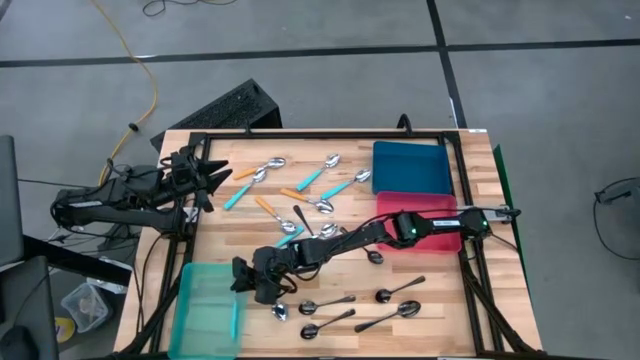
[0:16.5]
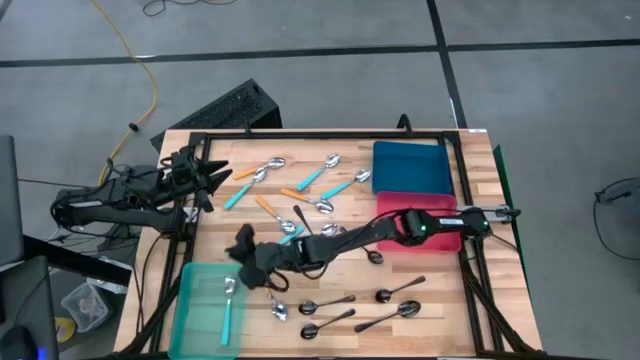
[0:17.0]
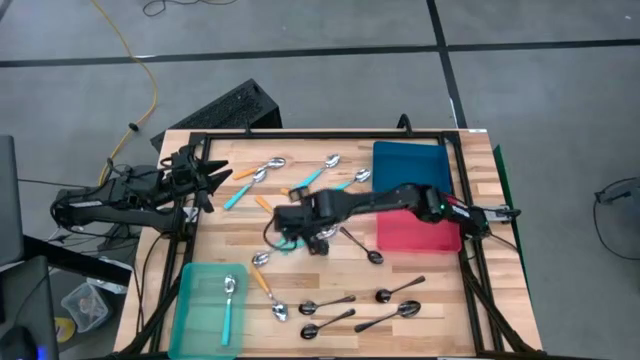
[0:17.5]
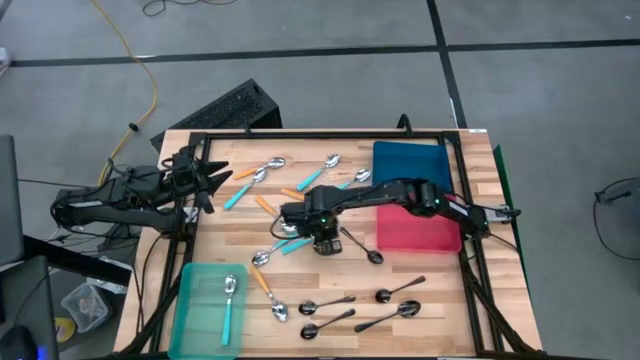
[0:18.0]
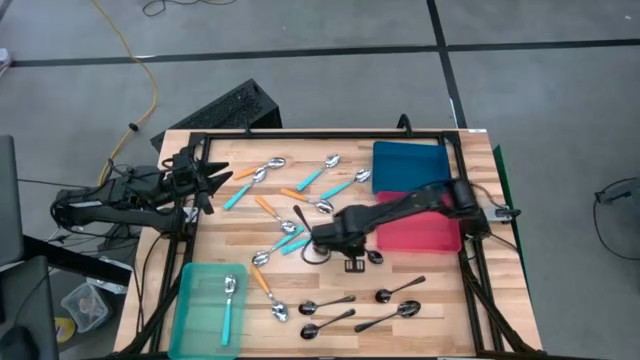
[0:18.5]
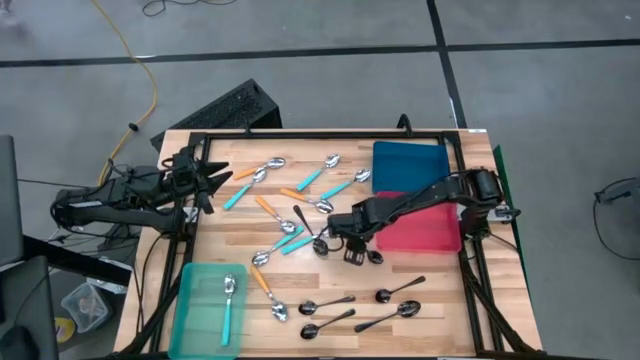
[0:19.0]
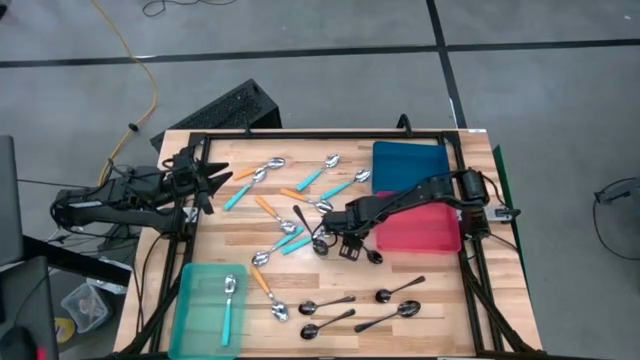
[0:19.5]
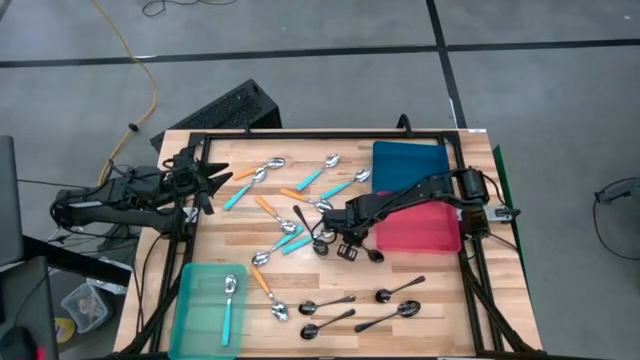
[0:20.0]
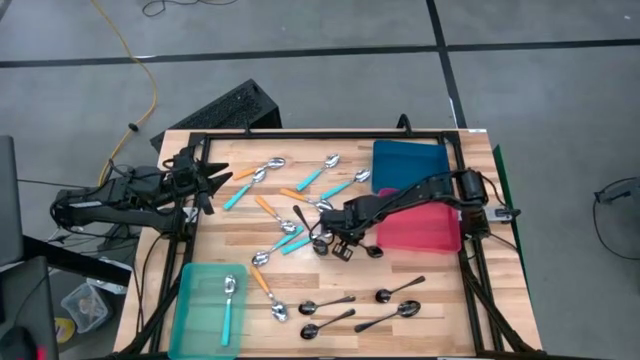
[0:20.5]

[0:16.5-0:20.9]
Task: Sort silverware by color (type)
Put the black spoon into the red bin

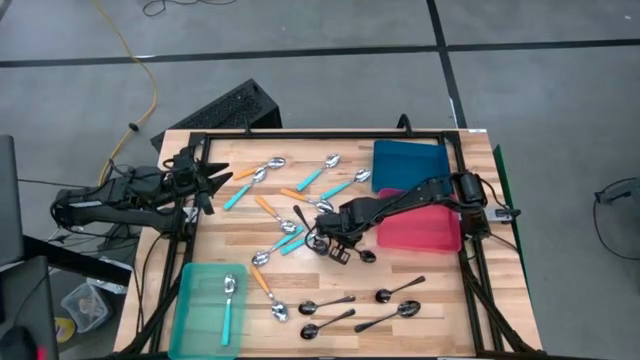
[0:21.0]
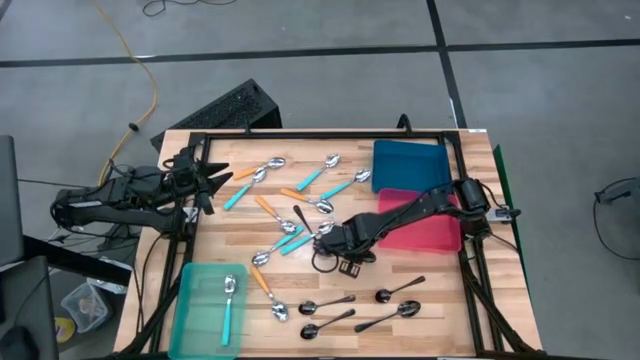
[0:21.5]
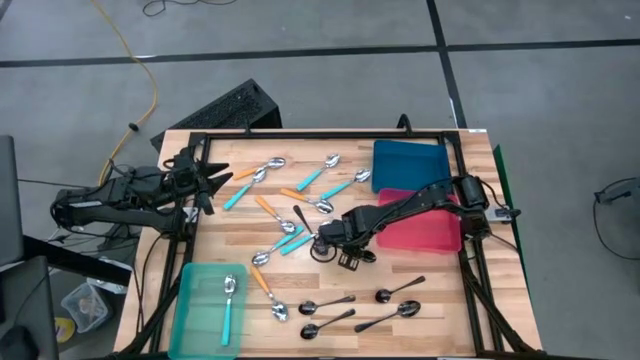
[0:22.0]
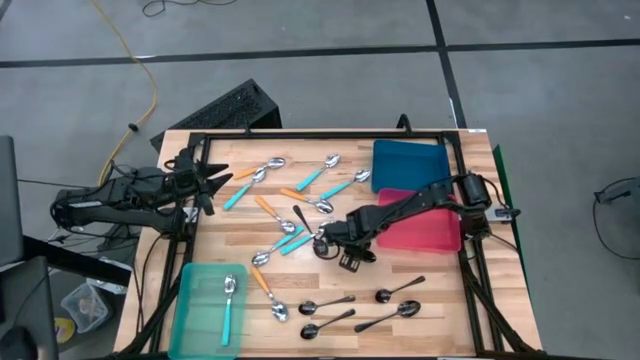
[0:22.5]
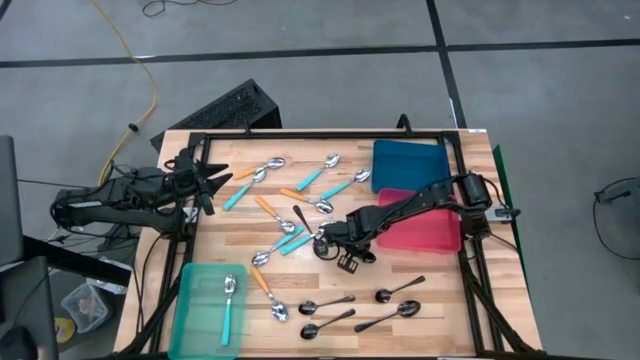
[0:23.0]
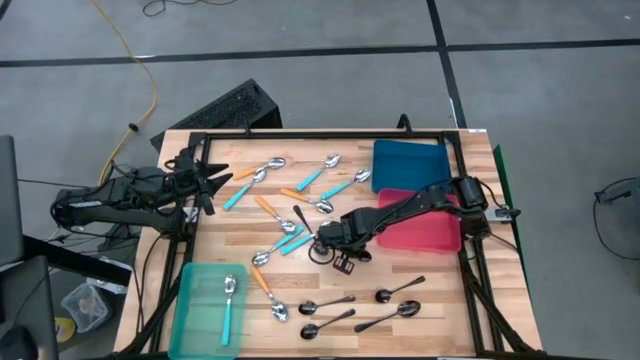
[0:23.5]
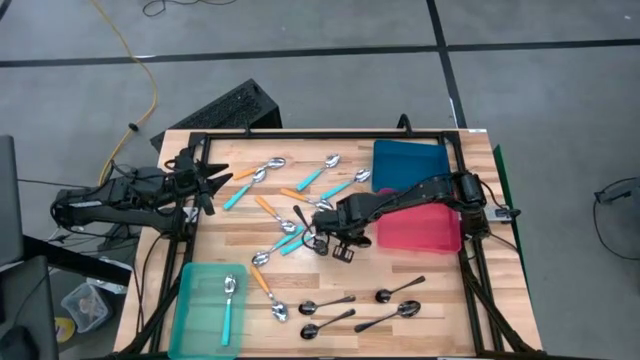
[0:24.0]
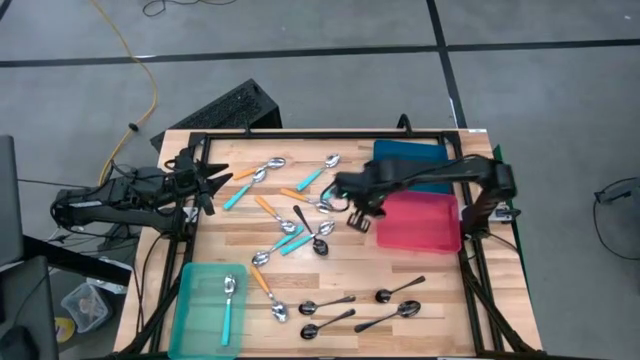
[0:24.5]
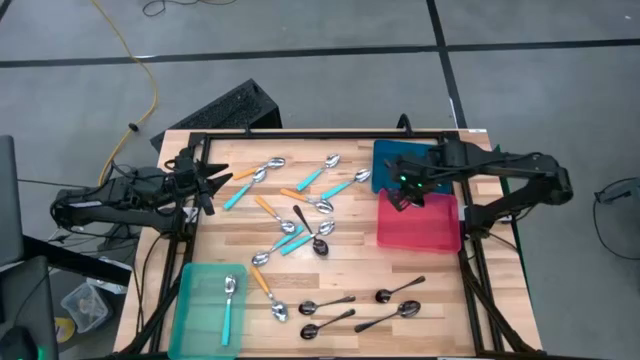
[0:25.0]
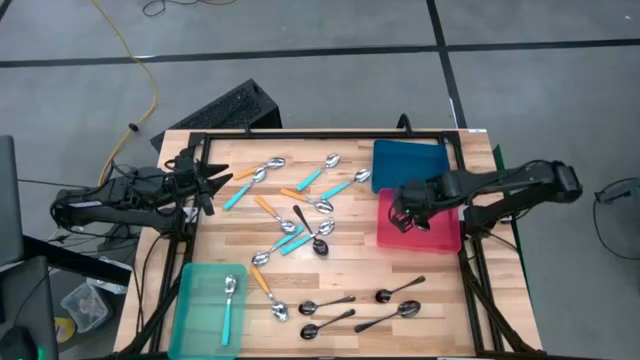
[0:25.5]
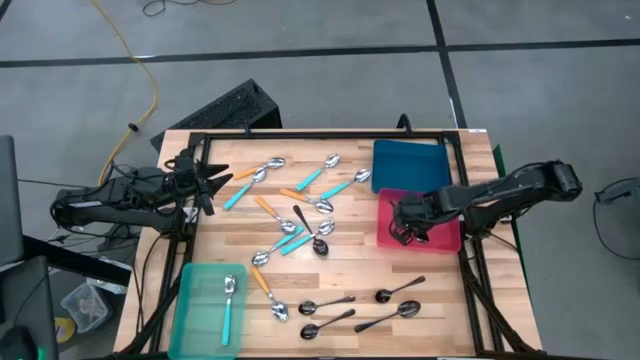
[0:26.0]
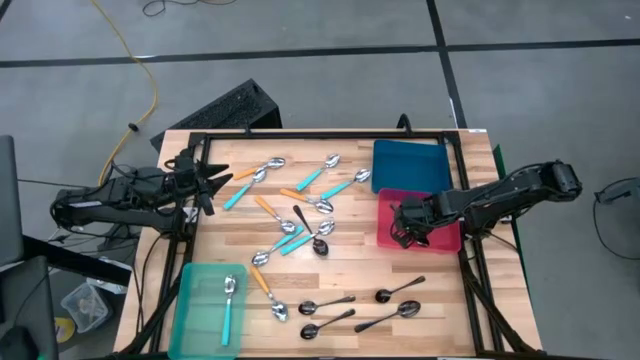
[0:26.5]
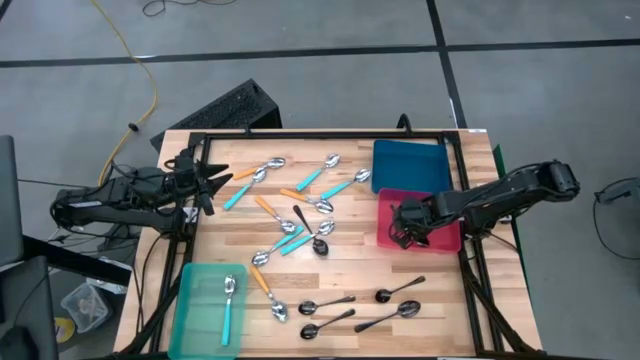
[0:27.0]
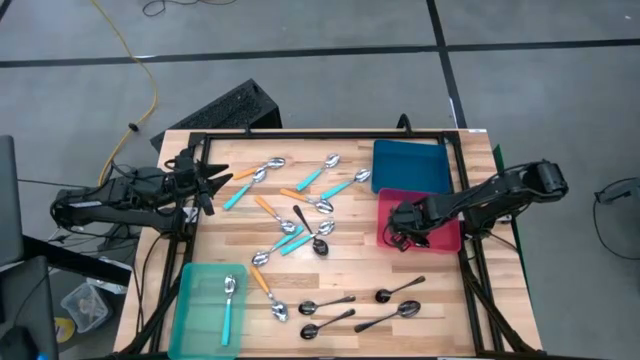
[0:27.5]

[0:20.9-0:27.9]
Put the black spoon into the red bin

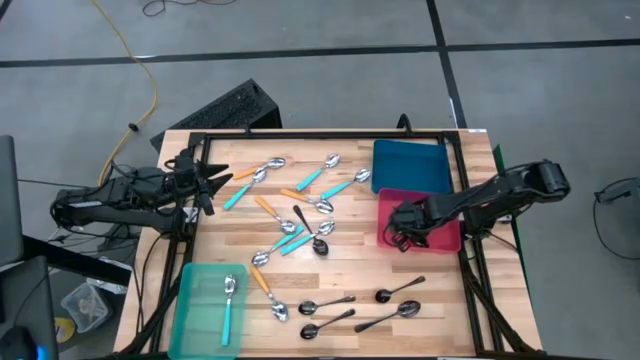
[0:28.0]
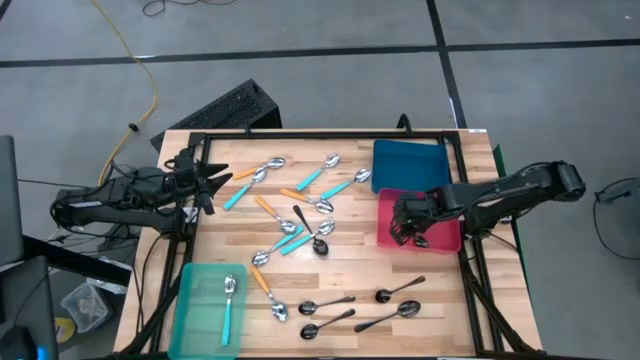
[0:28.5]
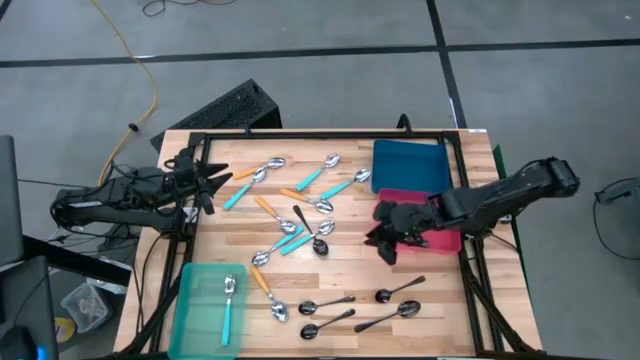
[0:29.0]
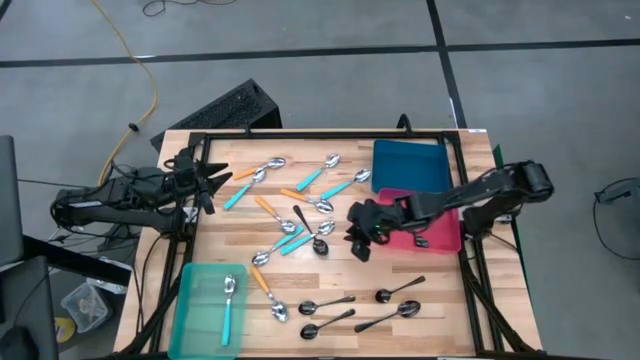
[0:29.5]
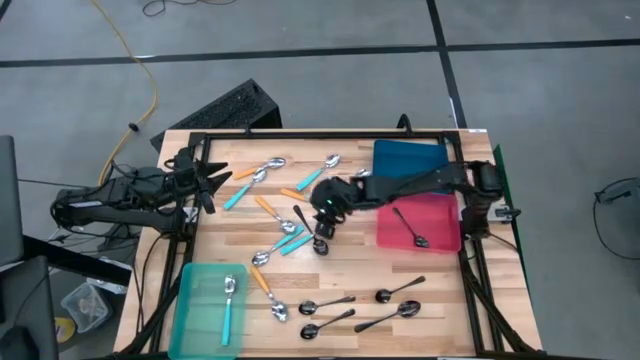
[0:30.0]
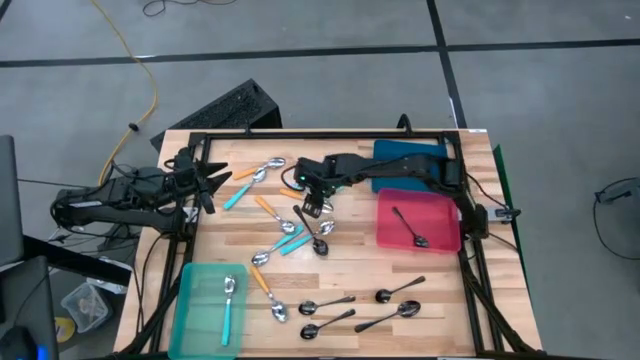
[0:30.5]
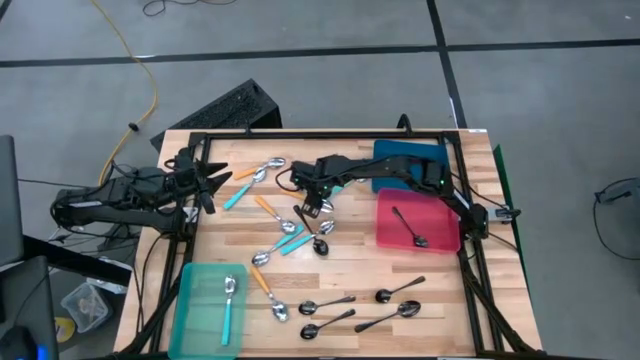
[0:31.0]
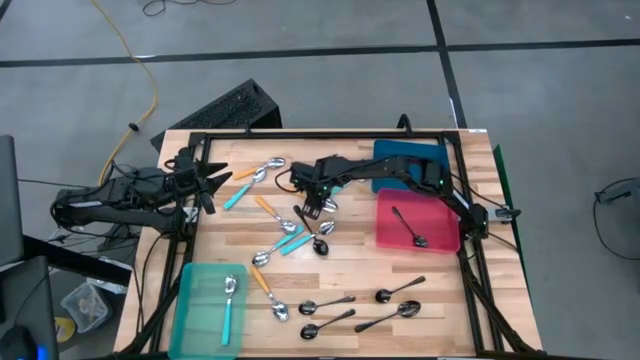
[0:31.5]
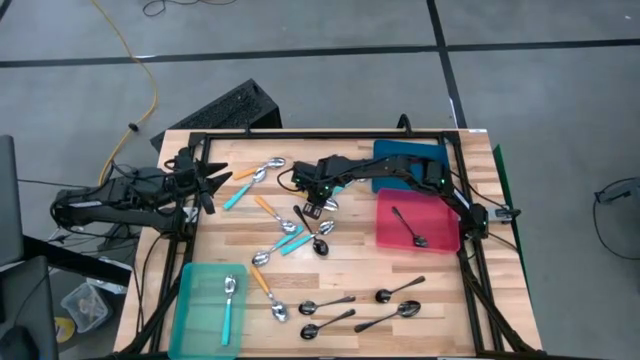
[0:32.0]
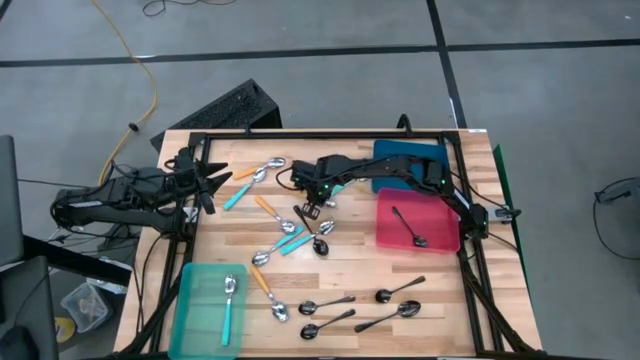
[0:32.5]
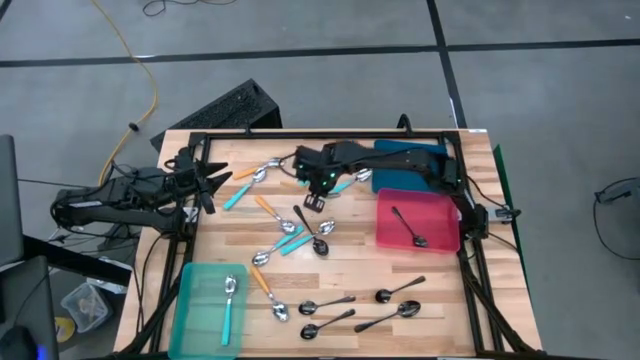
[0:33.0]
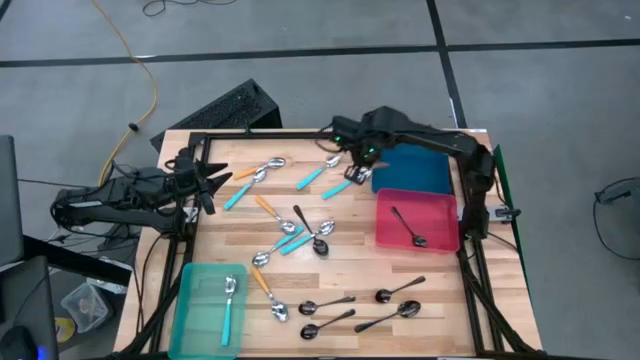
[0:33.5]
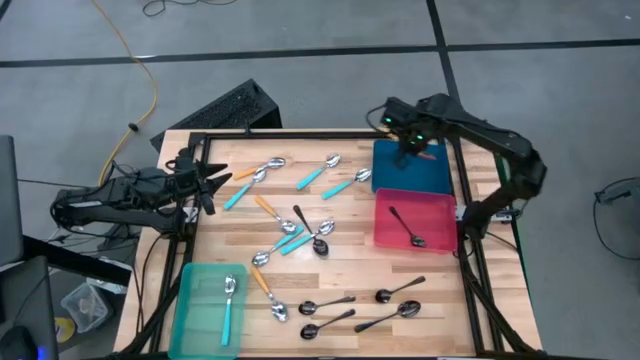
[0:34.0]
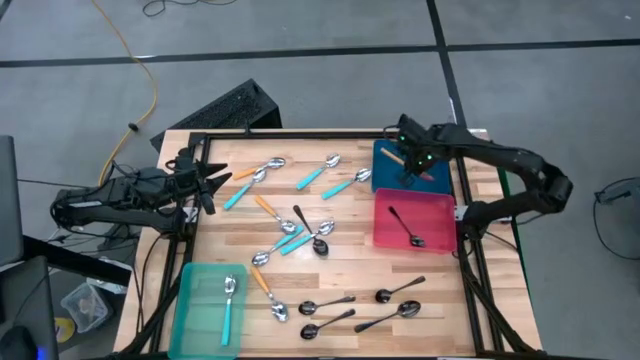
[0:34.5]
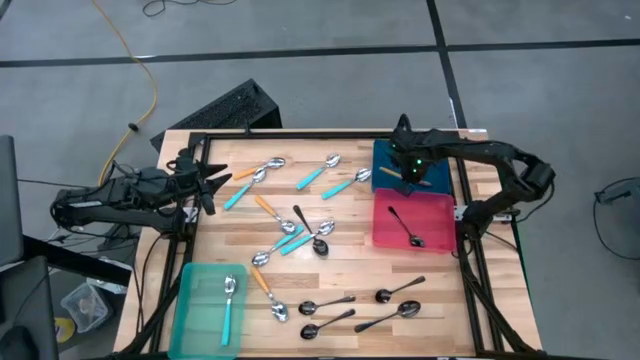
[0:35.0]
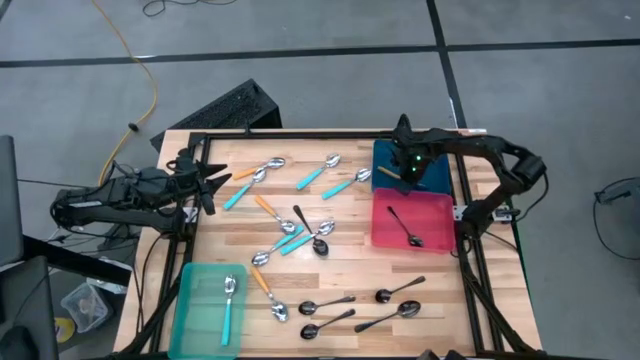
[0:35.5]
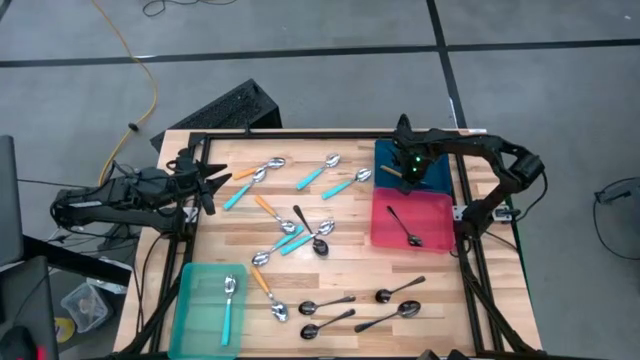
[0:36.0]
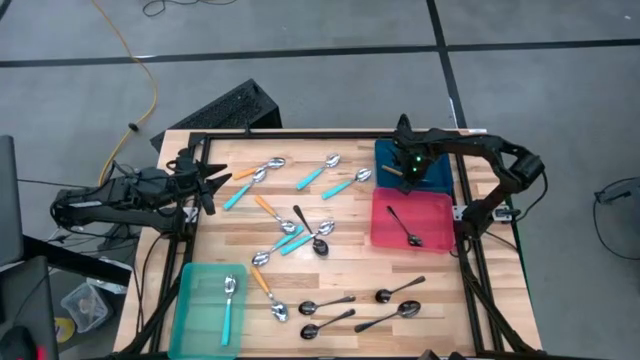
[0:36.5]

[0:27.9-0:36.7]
Put the yellow spoon into the blue bin
